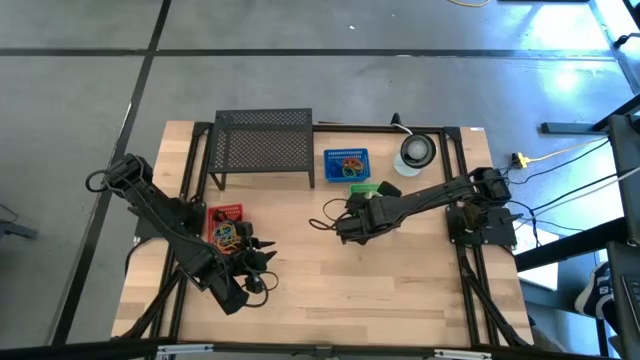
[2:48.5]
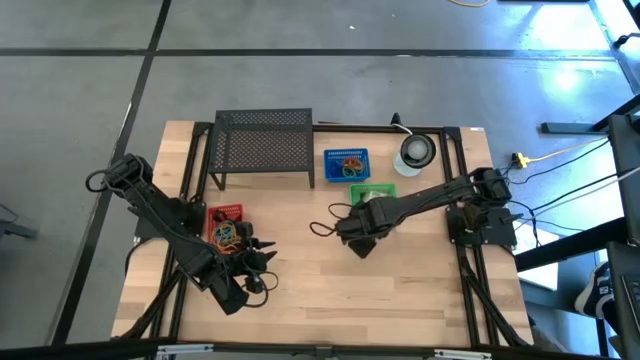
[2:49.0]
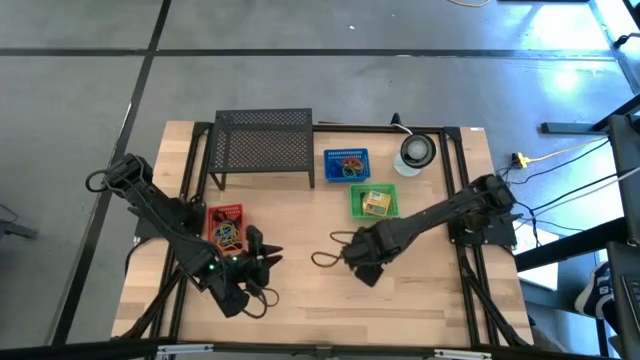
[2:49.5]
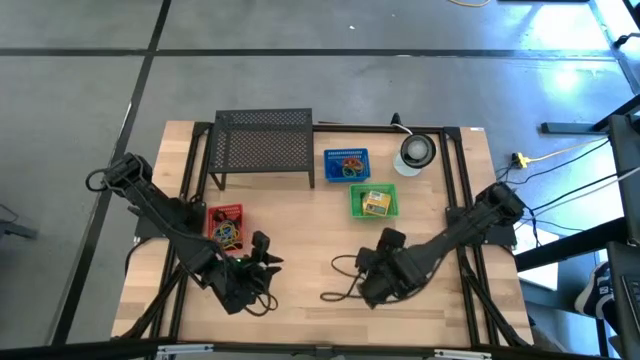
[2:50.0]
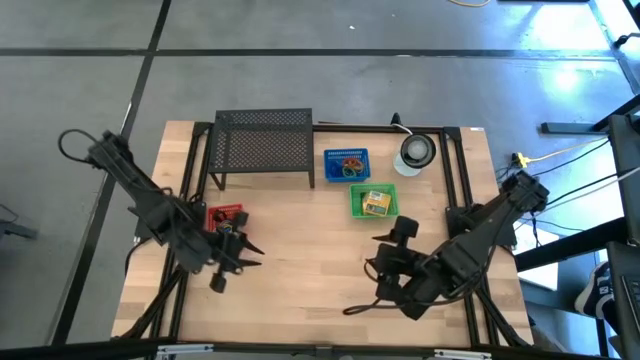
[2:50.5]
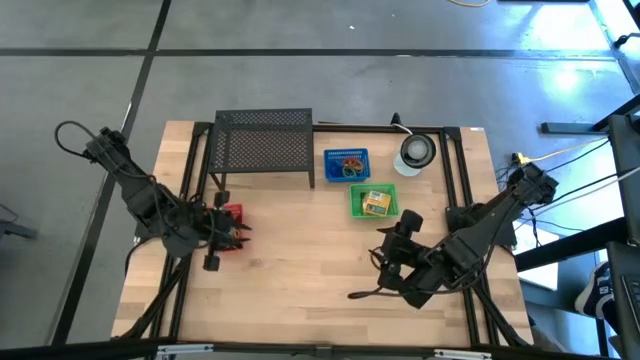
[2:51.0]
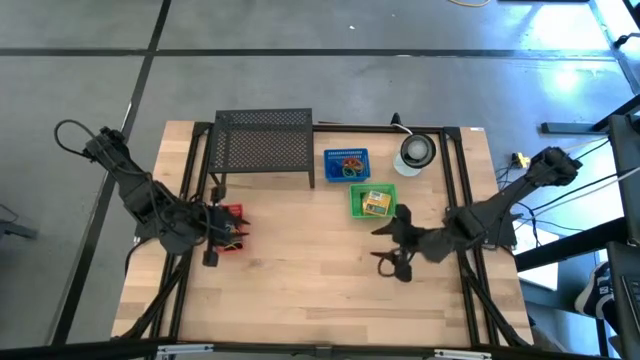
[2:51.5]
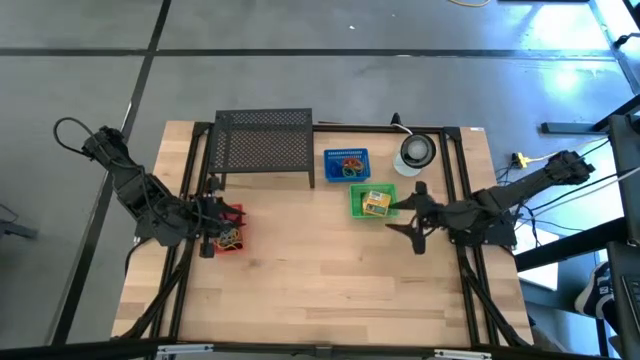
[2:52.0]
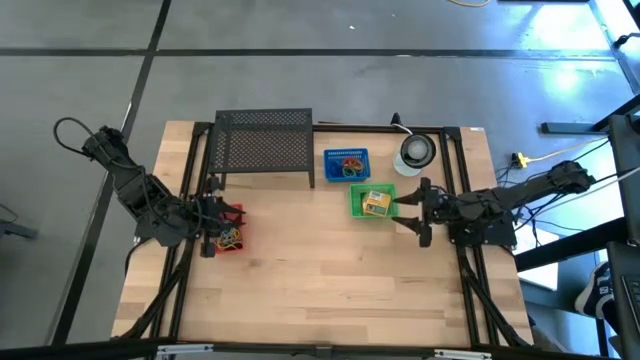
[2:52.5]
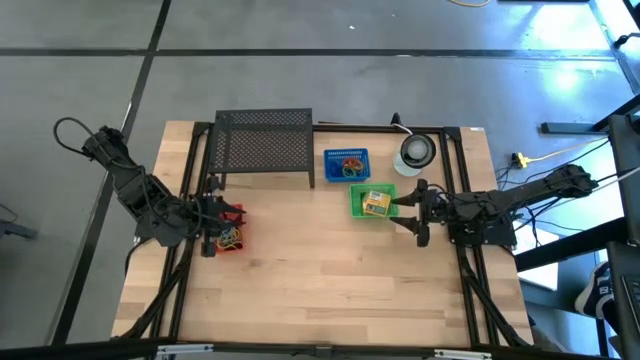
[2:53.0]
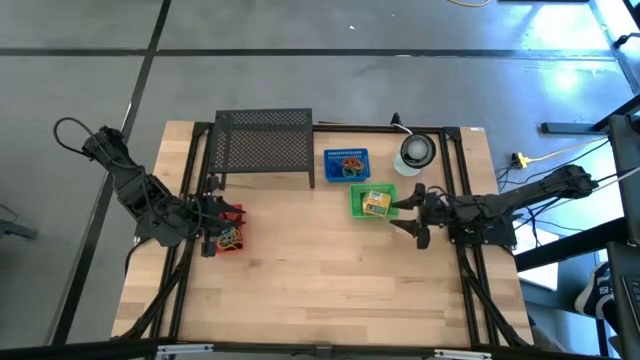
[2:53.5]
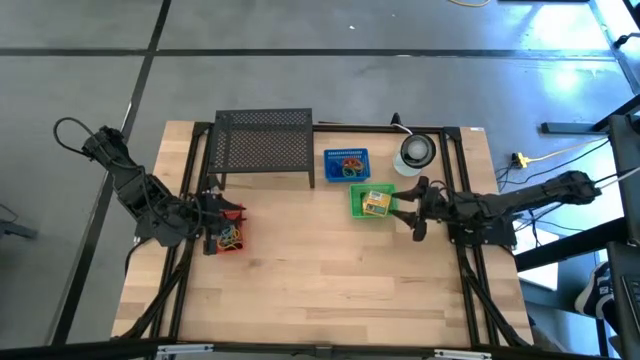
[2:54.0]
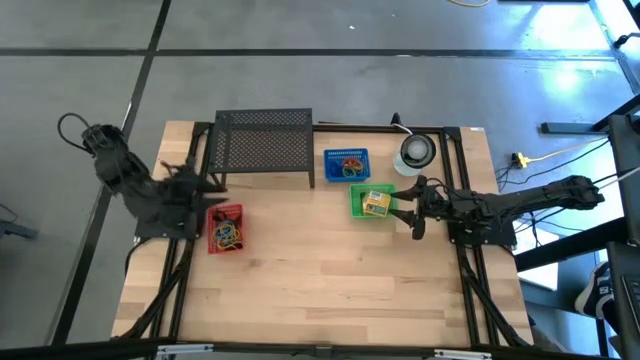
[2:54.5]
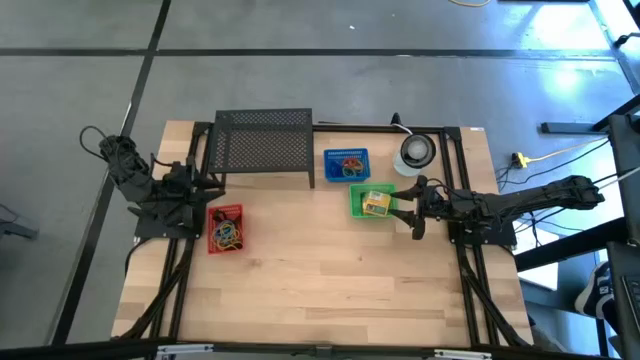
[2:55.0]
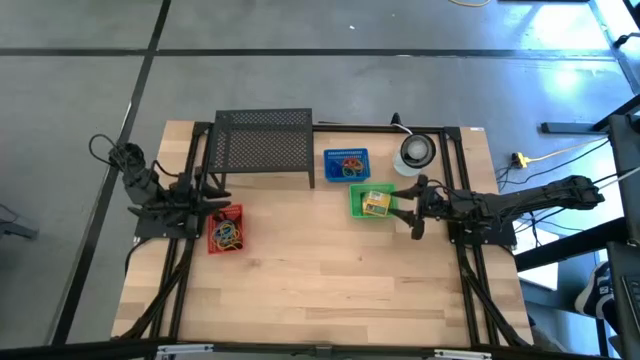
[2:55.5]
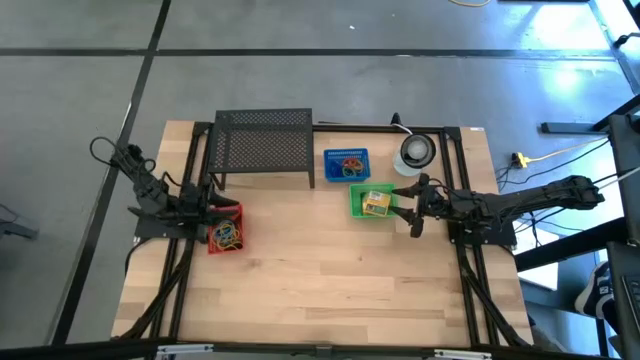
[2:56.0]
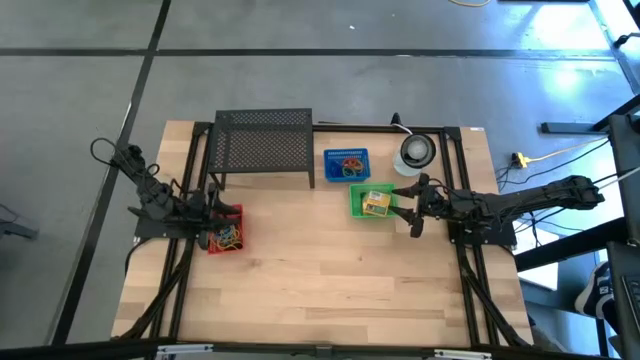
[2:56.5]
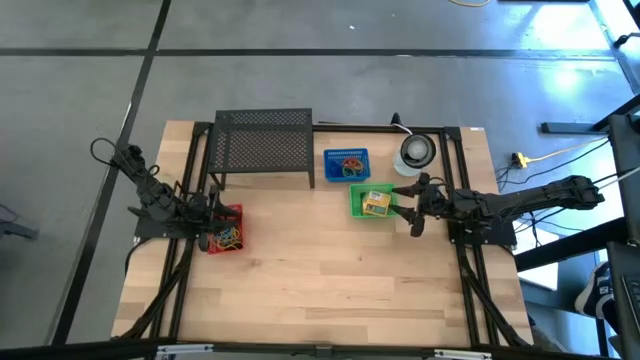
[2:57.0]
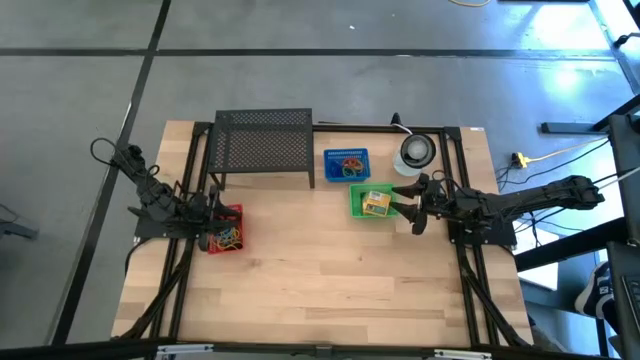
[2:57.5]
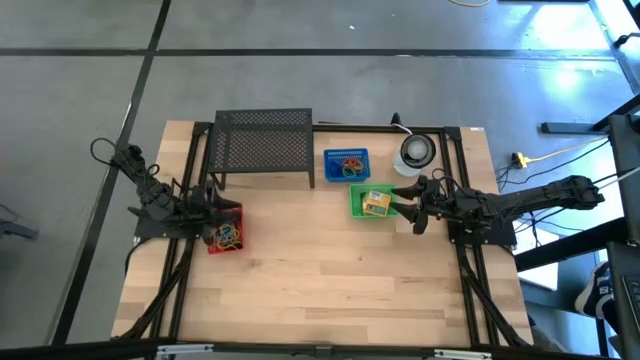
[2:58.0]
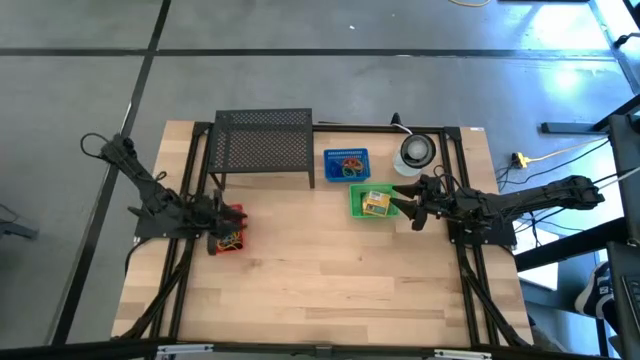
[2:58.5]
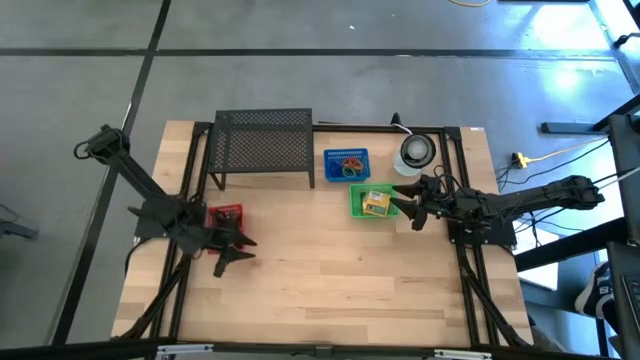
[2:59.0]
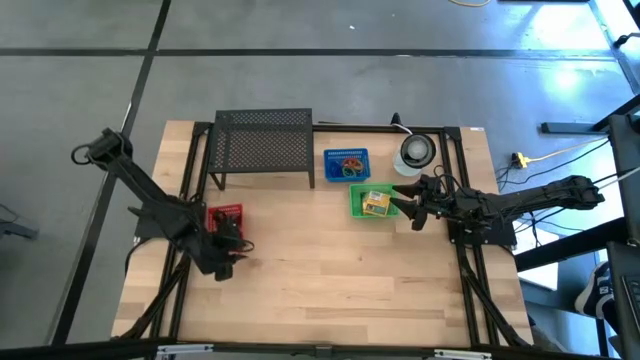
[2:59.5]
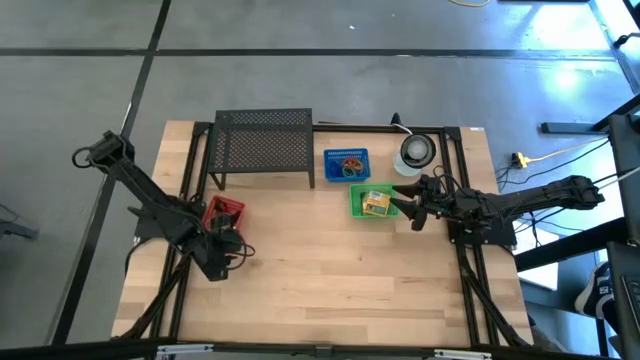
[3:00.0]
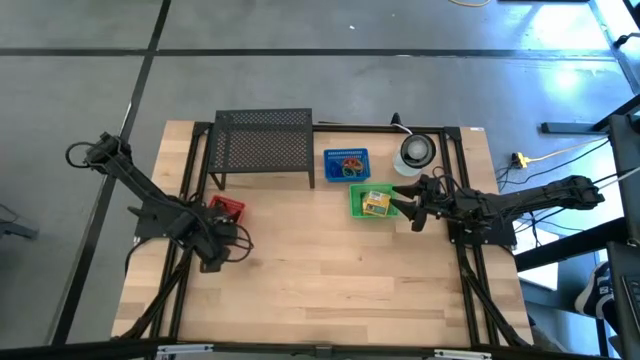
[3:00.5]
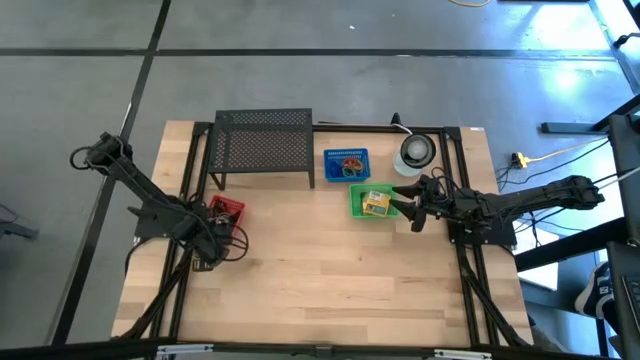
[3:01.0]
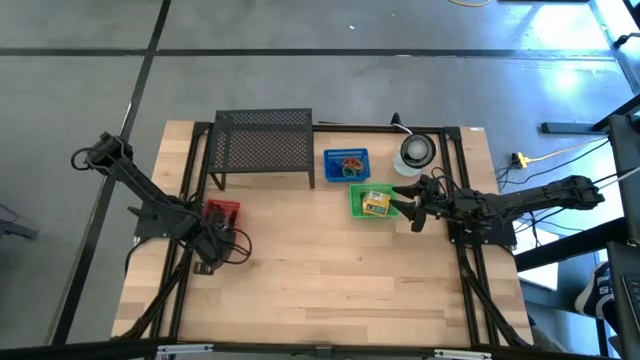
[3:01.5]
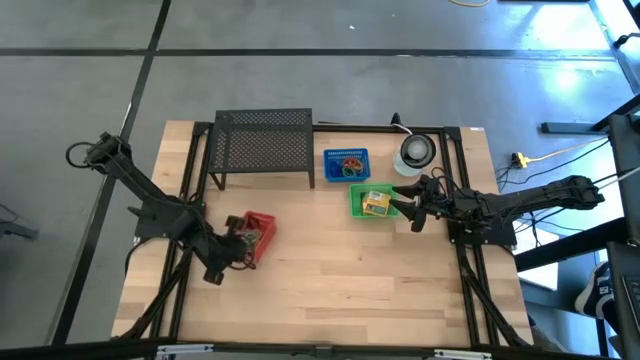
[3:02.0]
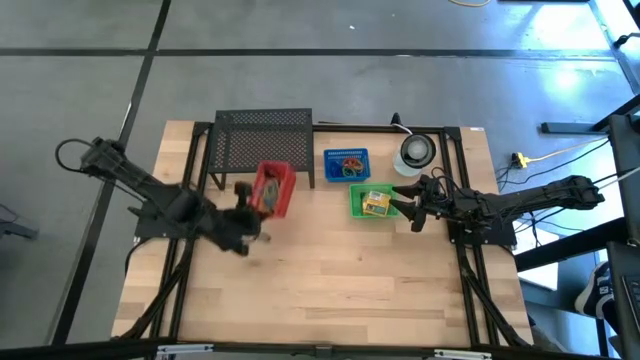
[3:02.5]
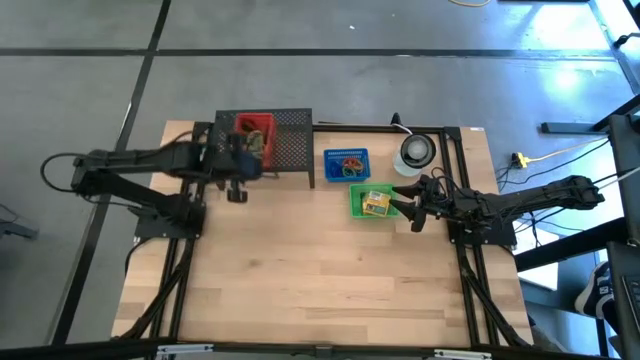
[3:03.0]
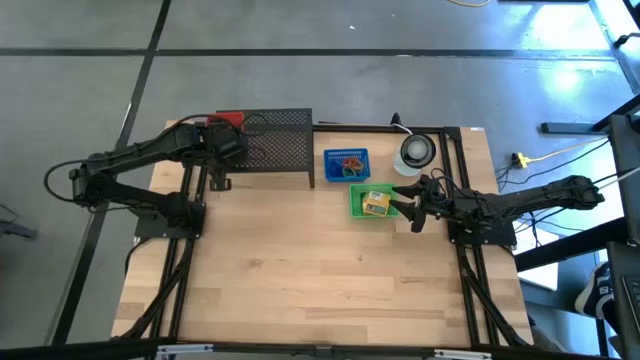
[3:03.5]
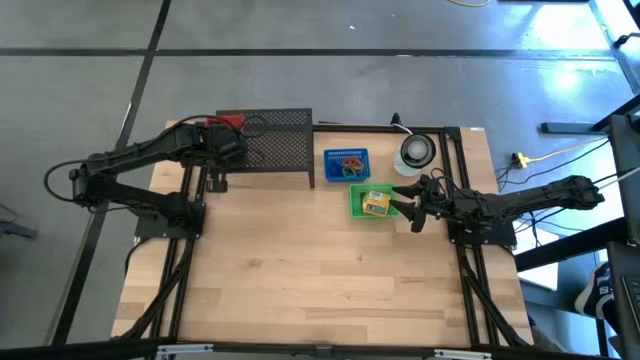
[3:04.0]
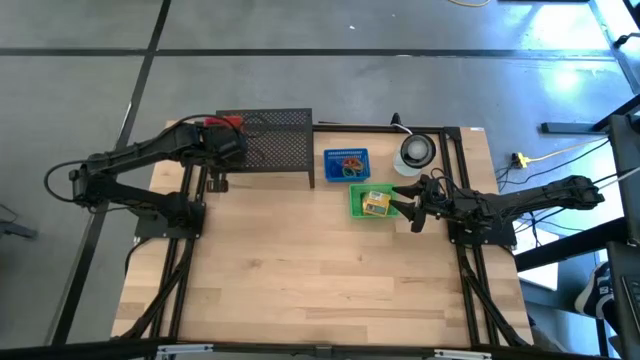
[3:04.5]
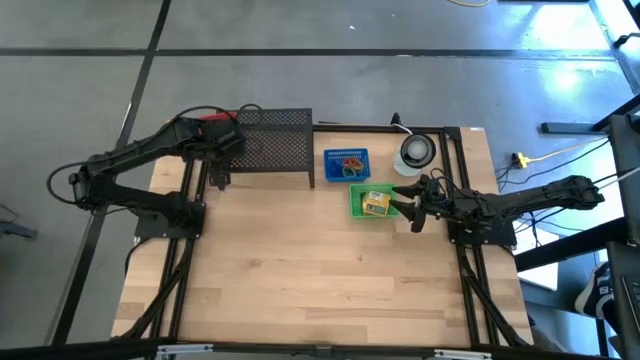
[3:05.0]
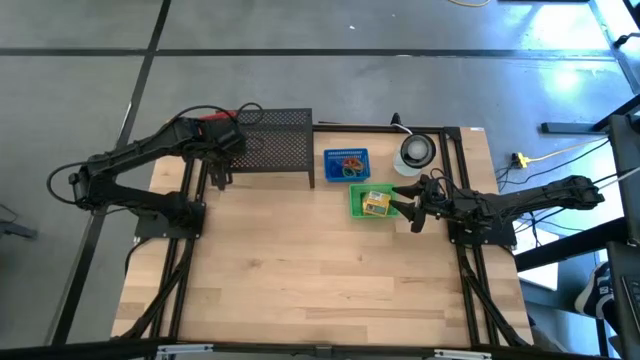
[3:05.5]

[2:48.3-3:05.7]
Task: Pick & Place Office Desk Supplies
Put the orange basket on the shelf

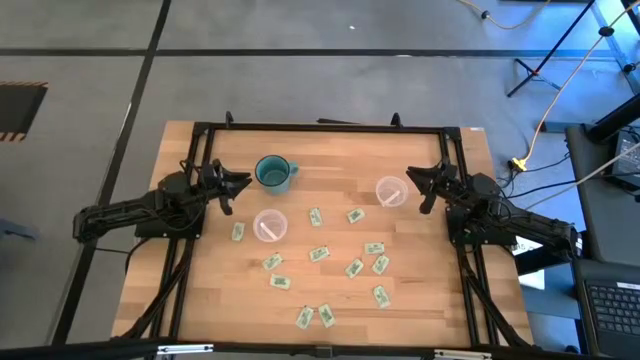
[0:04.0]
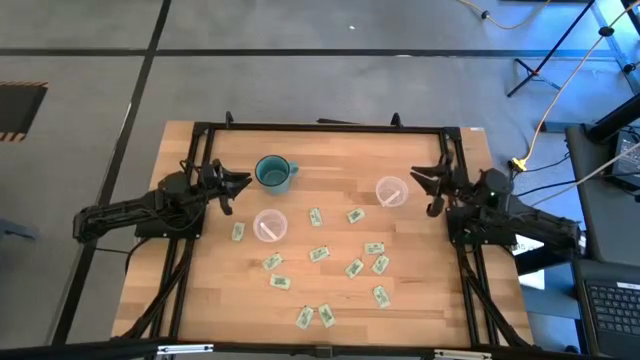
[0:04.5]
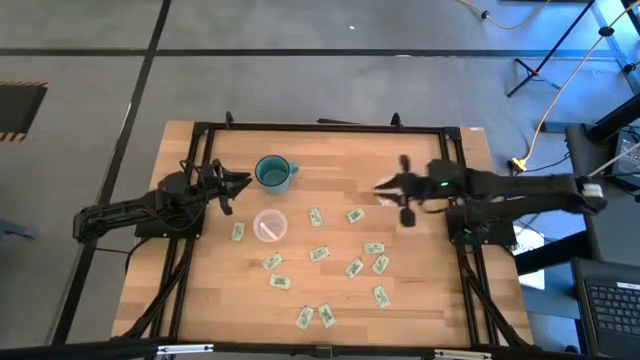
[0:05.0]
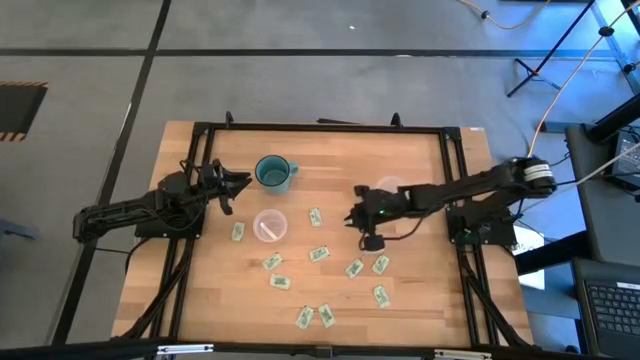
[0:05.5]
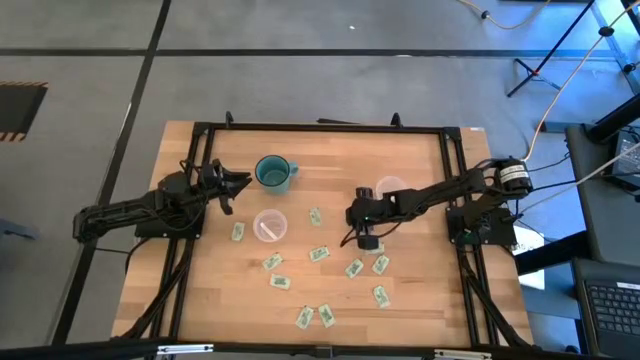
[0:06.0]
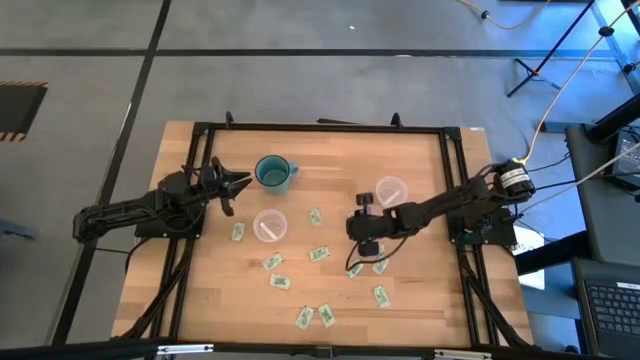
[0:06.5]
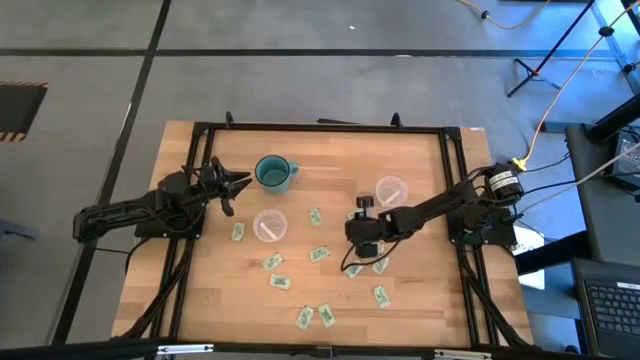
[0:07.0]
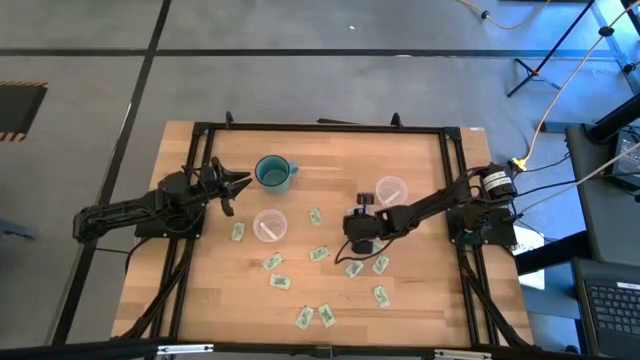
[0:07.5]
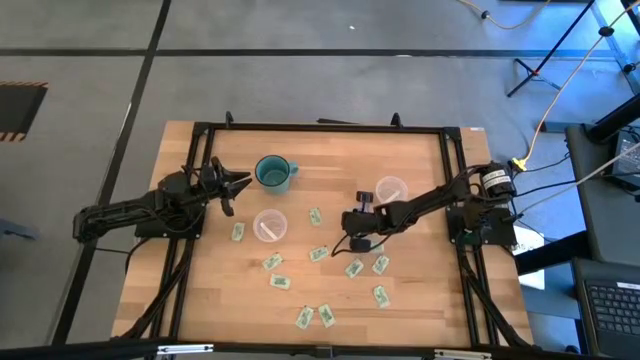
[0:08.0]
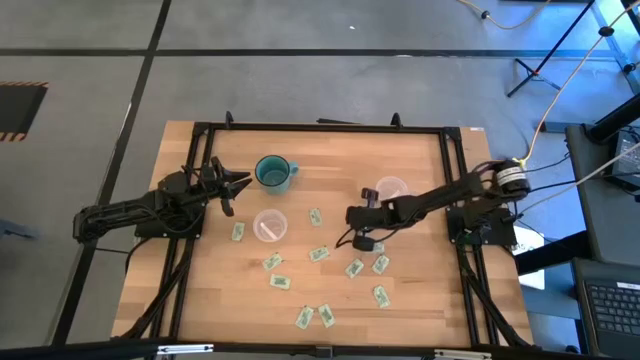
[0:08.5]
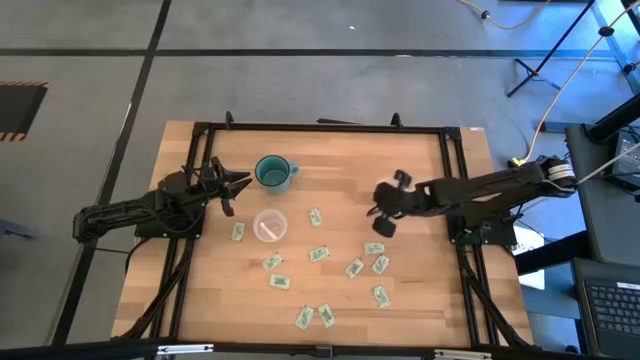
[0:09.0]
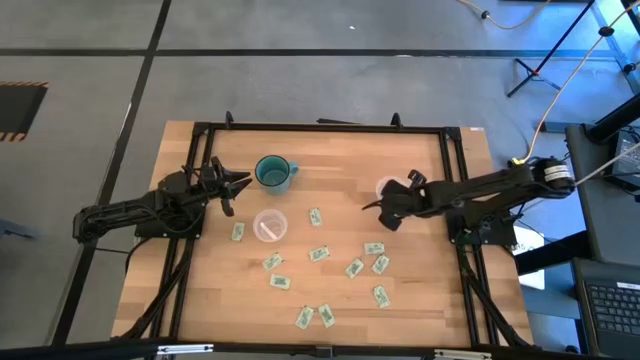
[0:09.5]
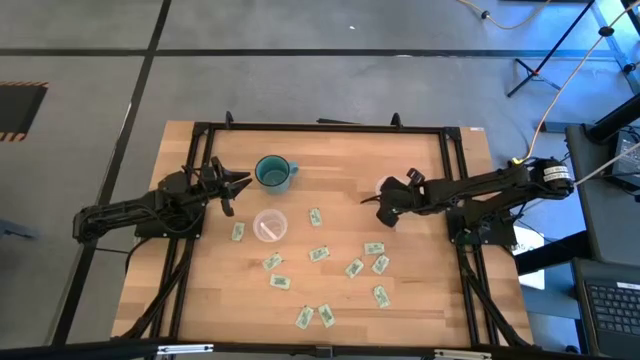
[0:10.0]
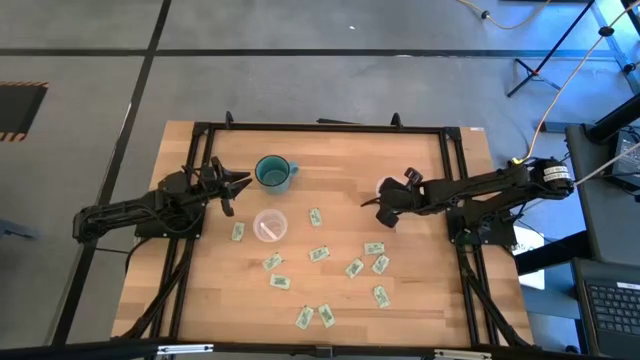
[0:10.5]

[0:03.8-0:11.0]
Task: Pick and place Stevia / Truvia into bins
Put the white stevia packet into the right transparent container
